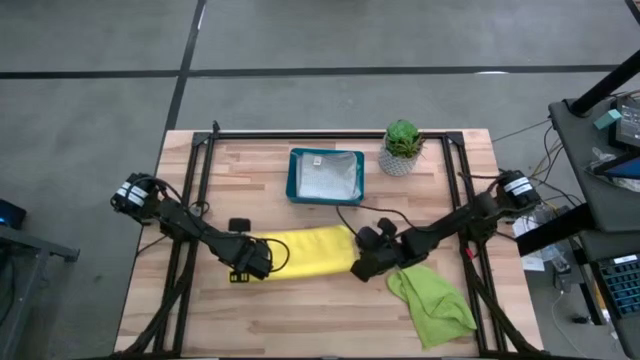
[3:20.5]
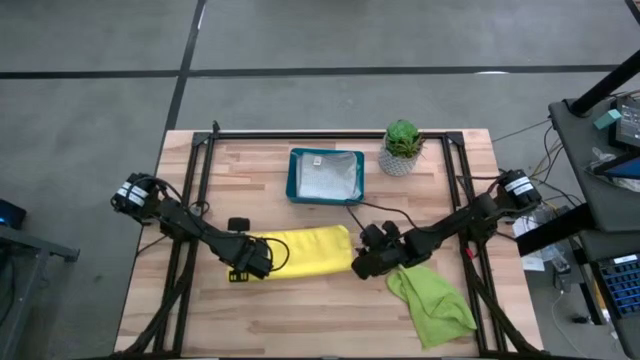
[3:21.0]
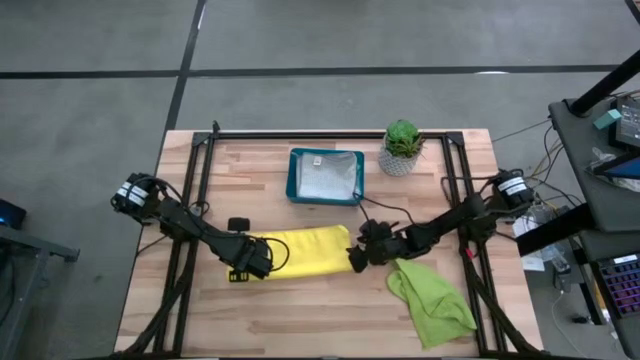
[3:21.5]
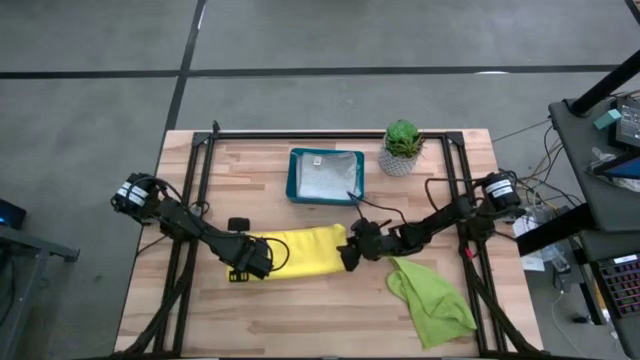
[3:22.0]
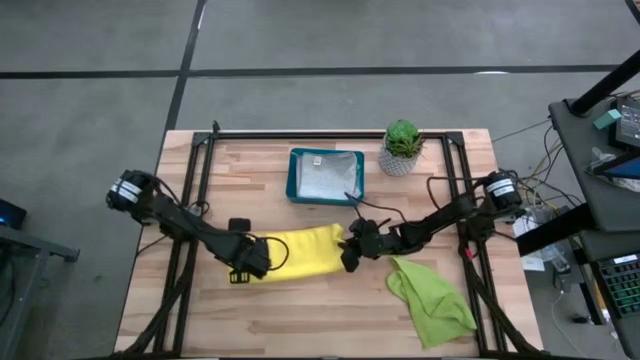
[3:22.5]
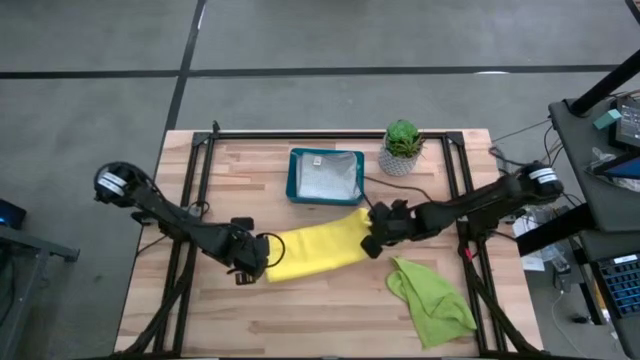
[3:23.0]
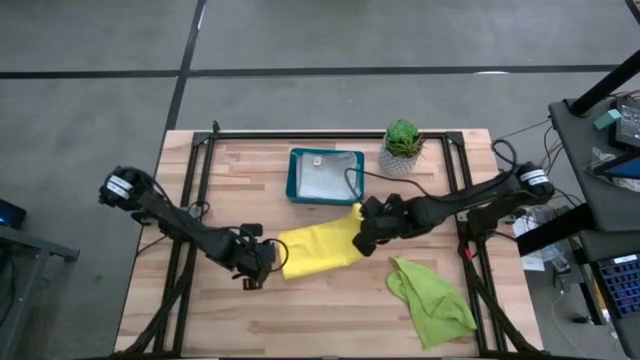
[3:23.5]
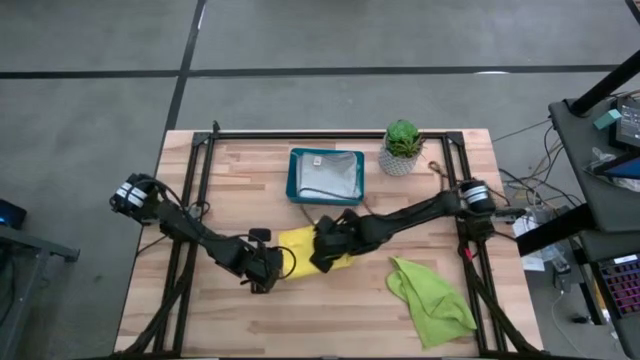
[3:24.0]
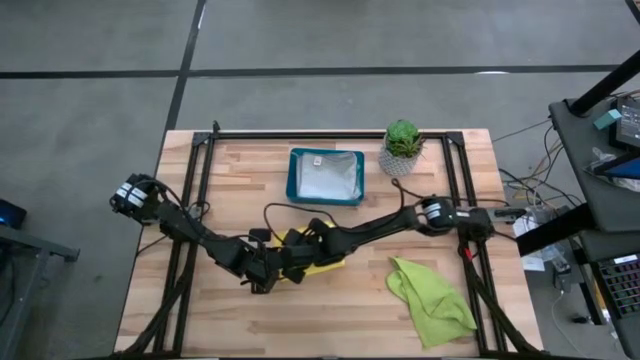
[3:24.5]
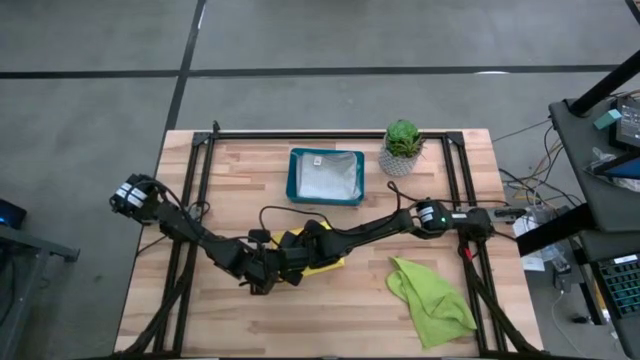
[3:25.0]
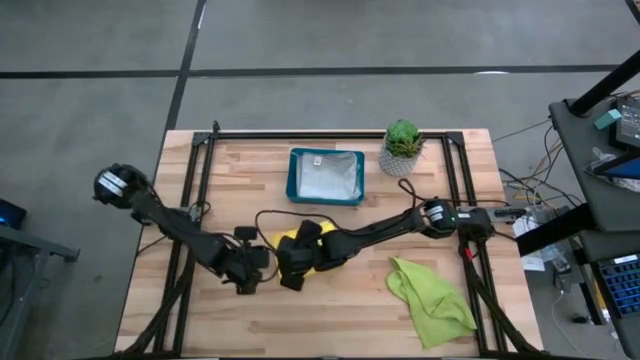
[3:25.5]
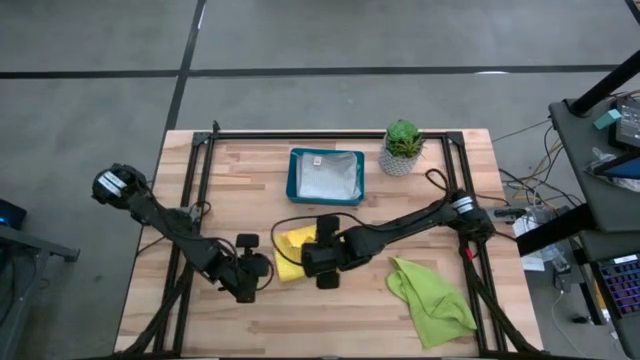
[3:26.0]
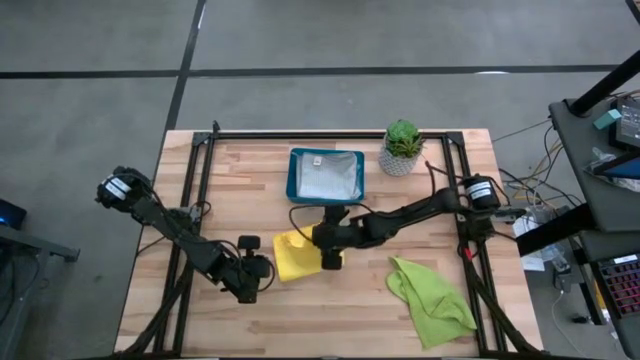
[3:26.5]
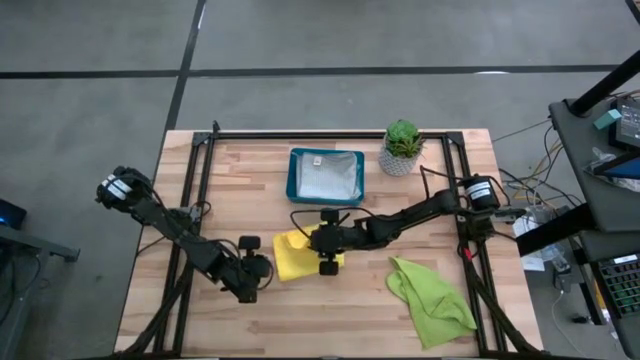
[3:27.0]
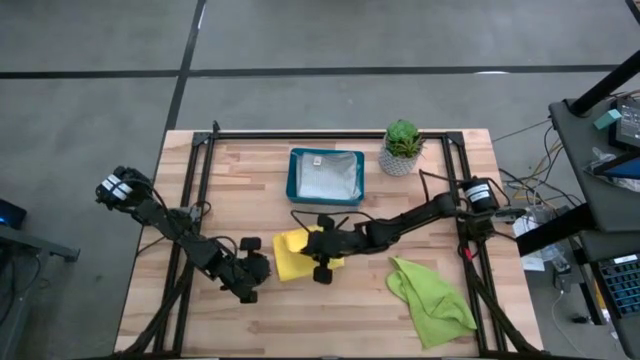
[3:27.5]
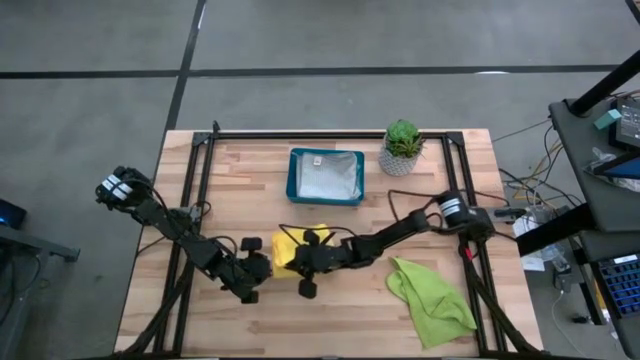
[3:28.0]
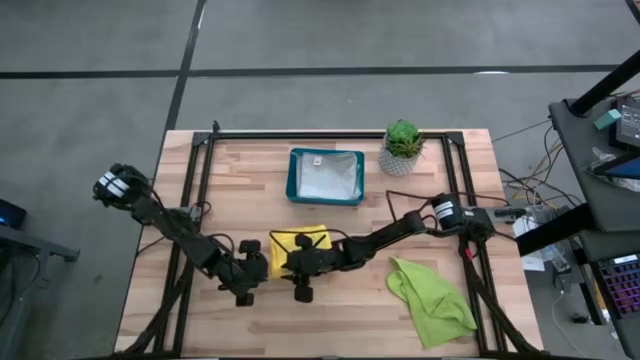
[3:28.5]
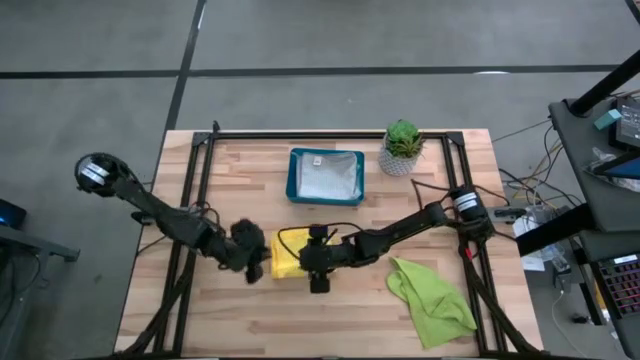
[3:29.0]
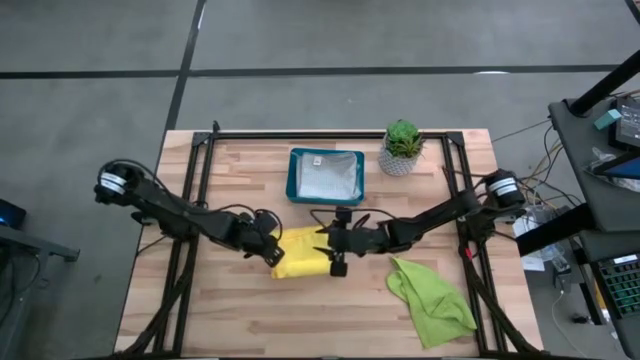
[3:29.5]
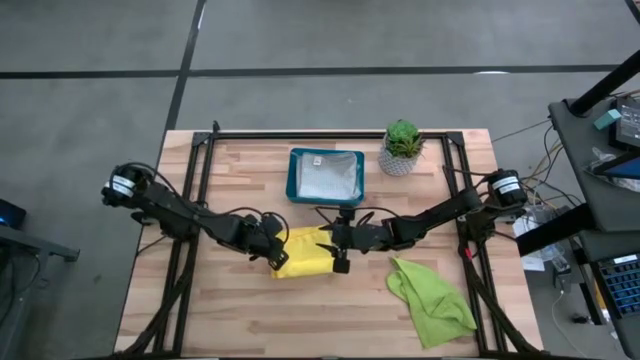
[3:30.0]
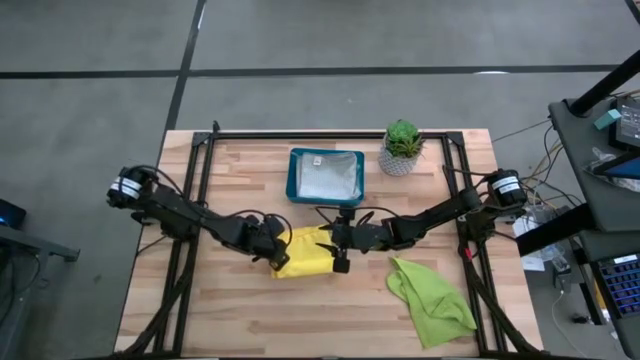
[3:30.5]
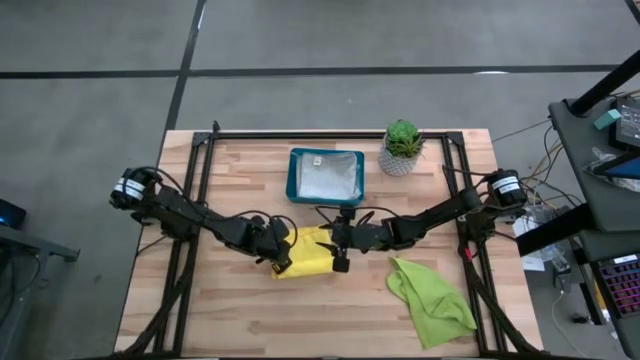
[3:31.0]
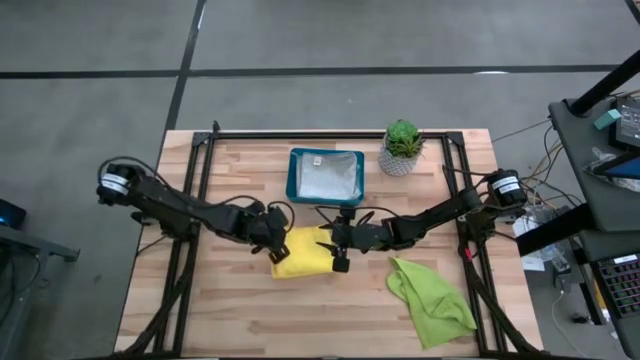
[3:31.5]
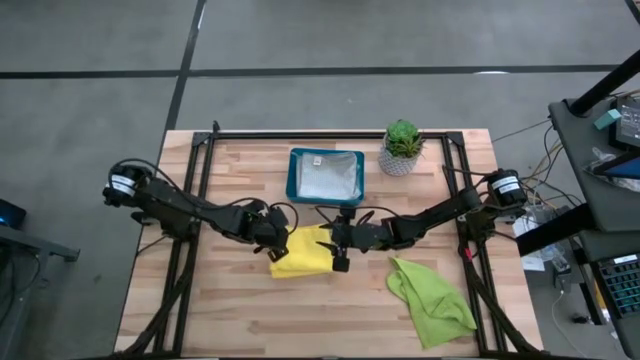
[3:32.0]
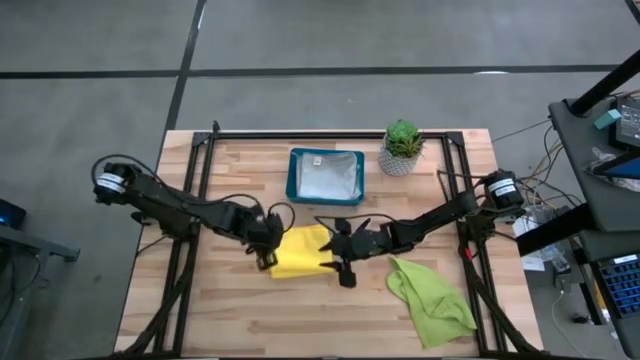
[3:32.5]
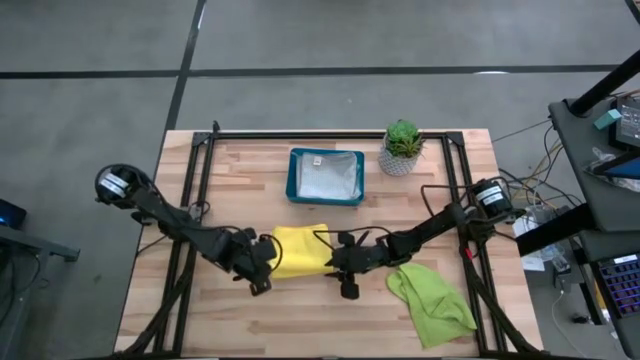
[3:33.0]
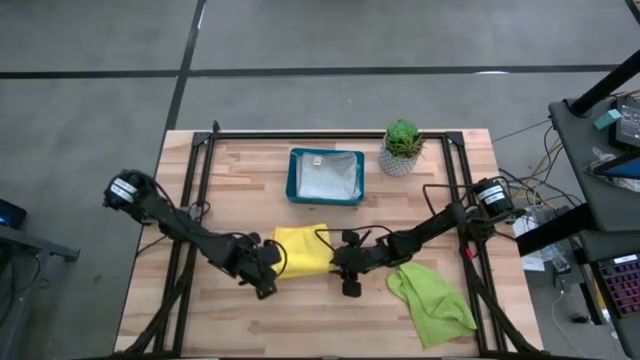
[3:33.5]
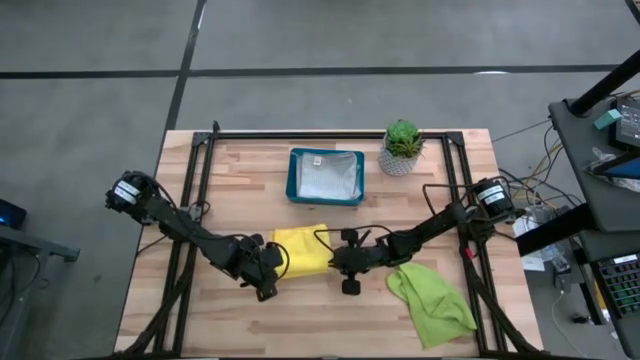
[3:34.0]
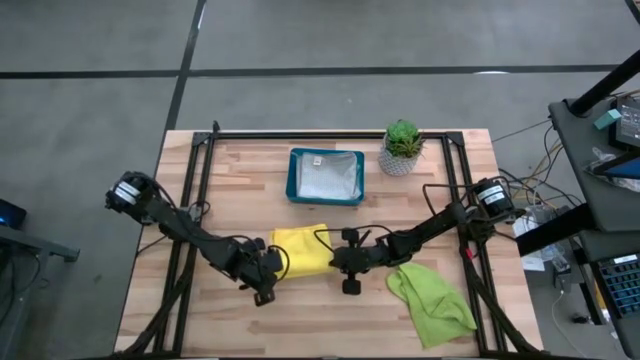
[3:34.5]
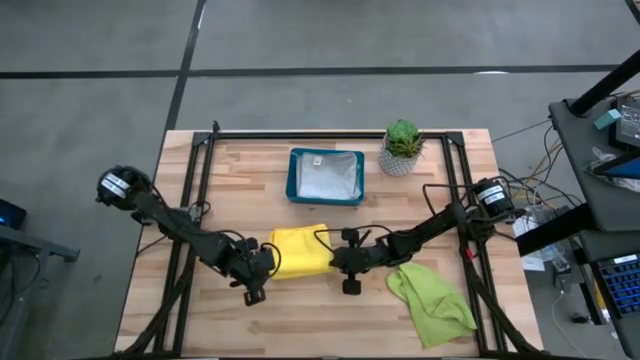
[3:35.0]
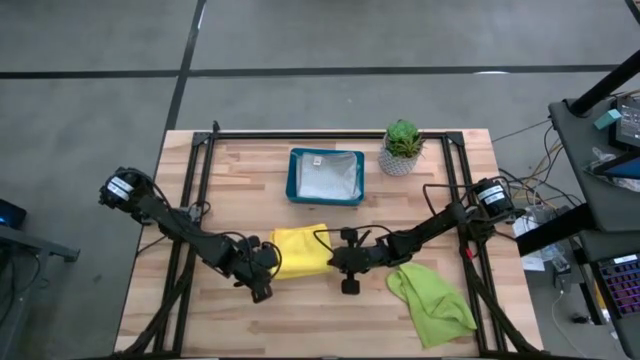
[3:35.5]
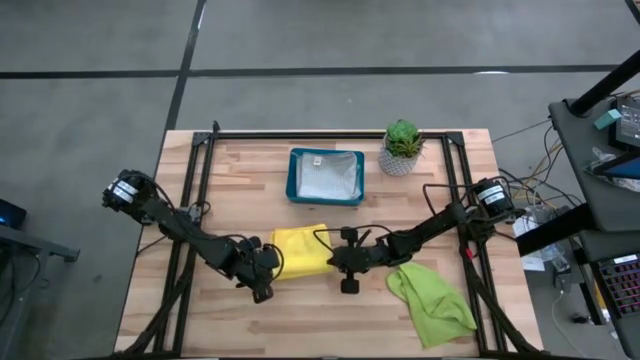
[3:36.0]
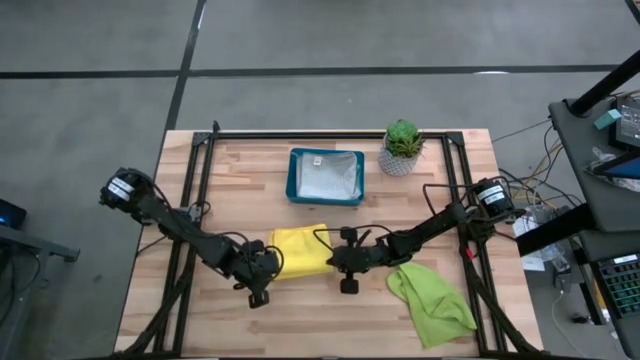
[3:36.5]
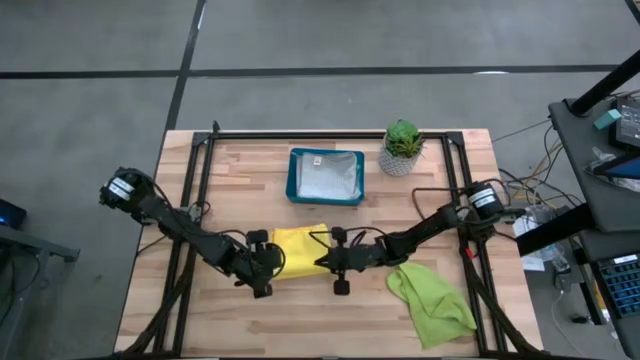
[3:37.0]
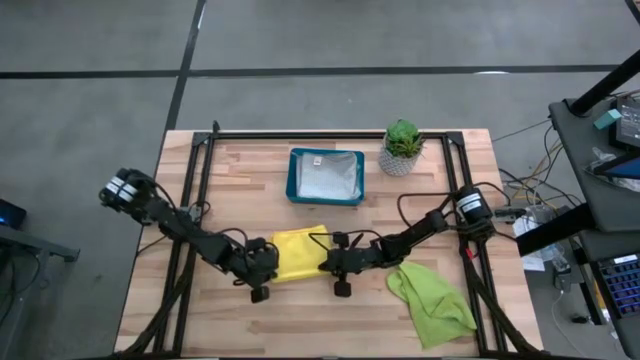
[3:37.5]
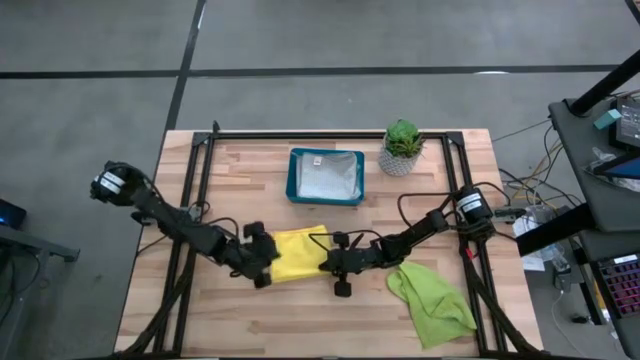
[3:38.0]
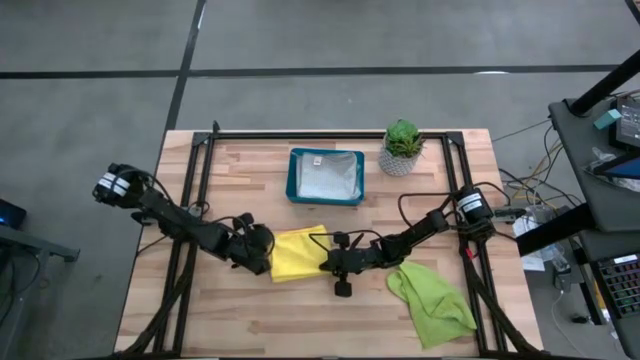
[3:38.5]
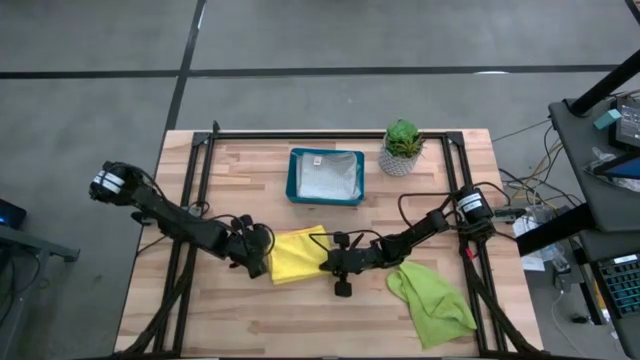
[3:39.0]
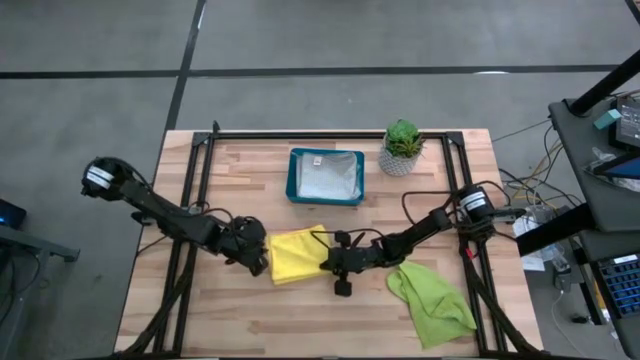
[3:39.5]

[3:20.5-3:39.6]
Task: Fold microfiber towels
Fold the yellow microfiber cloth

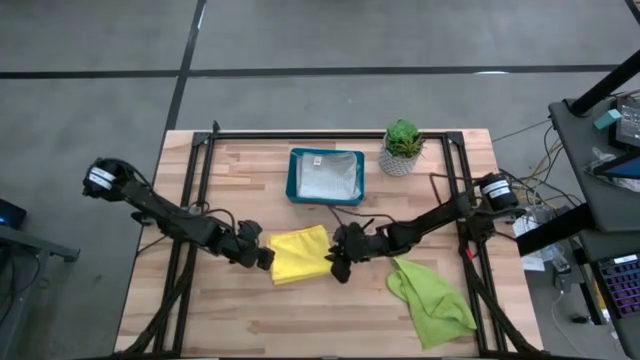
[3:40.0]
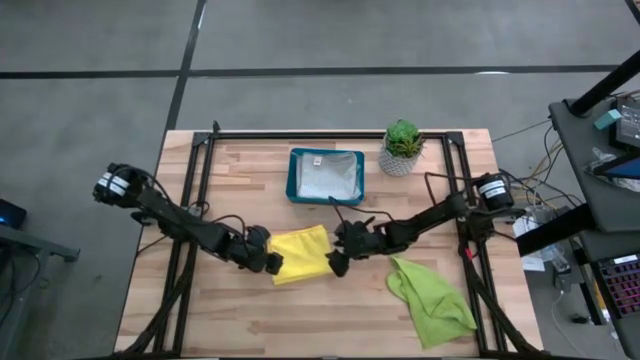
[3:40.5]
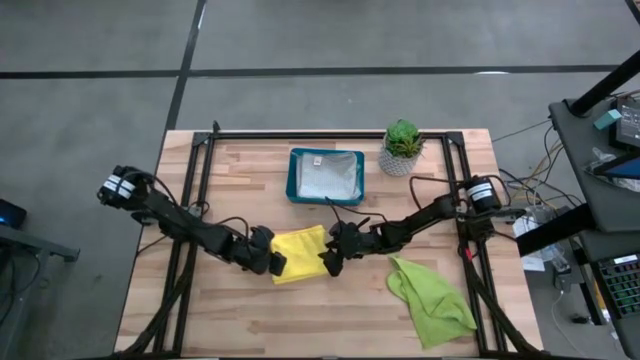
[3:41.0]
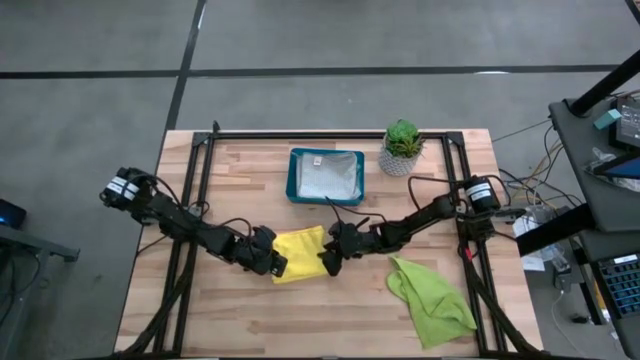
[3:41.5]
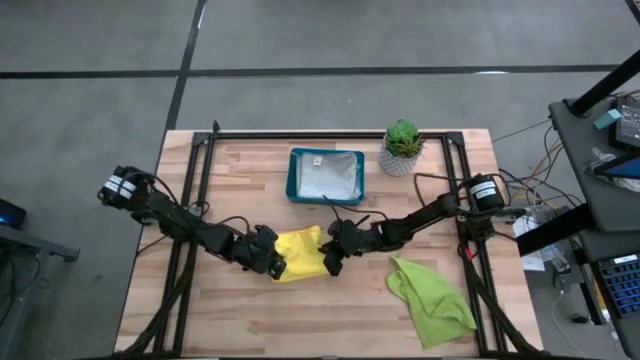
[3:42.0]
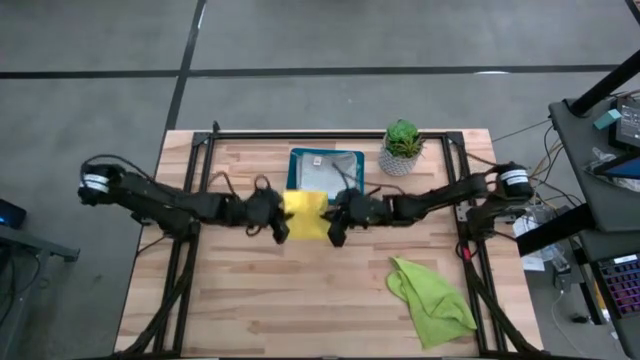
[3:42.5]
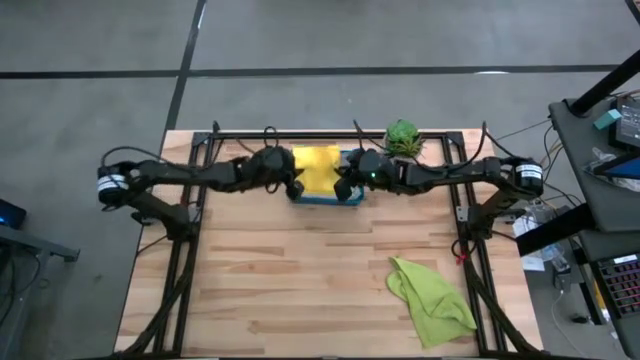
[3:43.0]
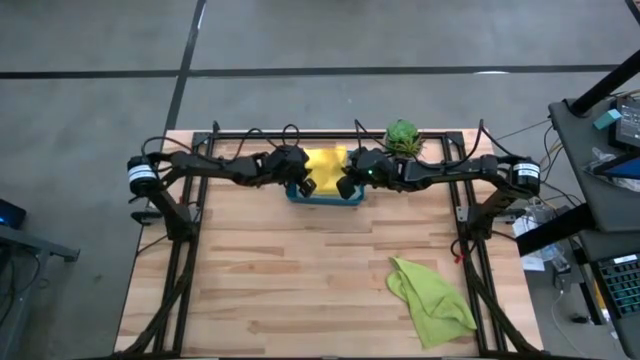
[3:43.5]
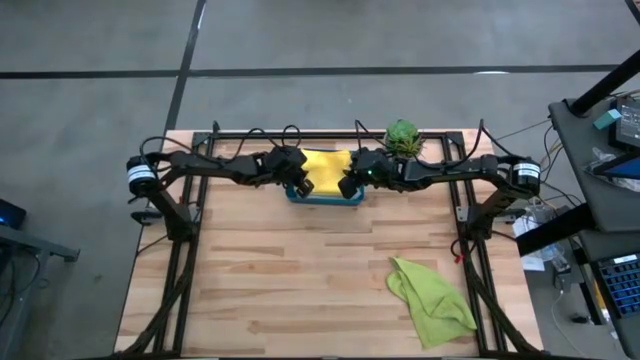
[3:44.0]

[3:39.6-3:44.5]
Put the folded yellow microfiber cloth into the bin
